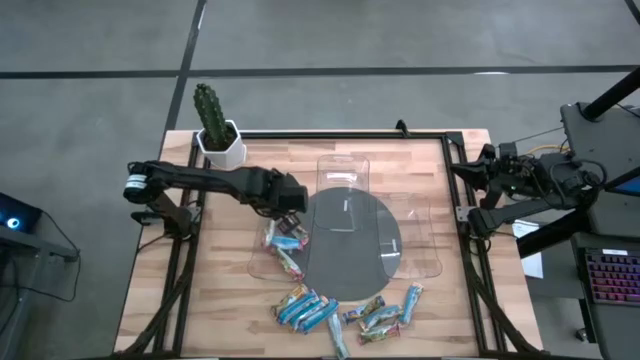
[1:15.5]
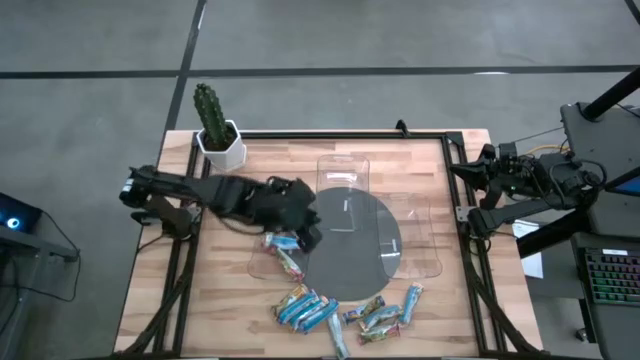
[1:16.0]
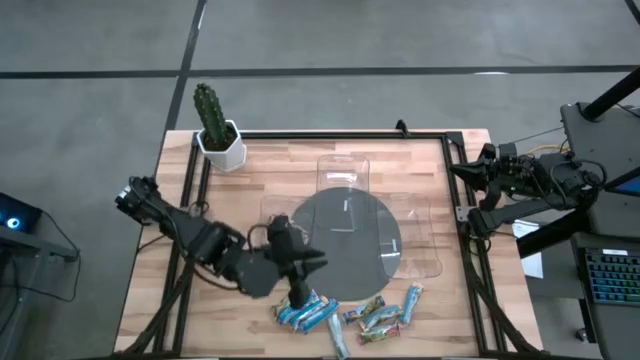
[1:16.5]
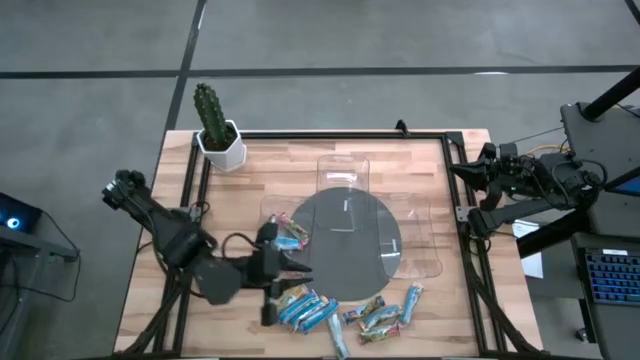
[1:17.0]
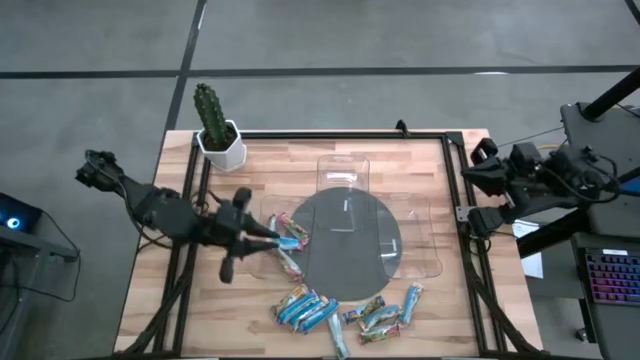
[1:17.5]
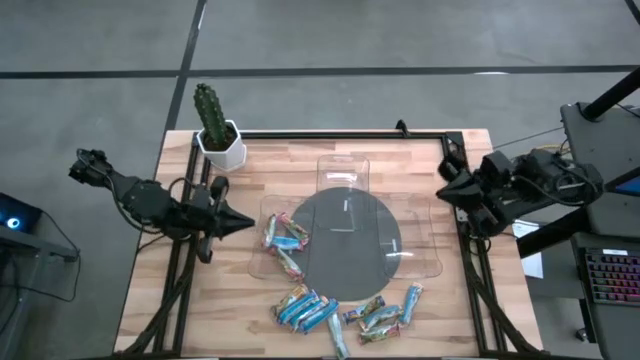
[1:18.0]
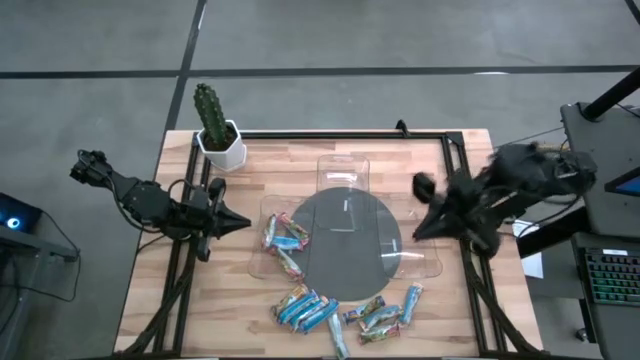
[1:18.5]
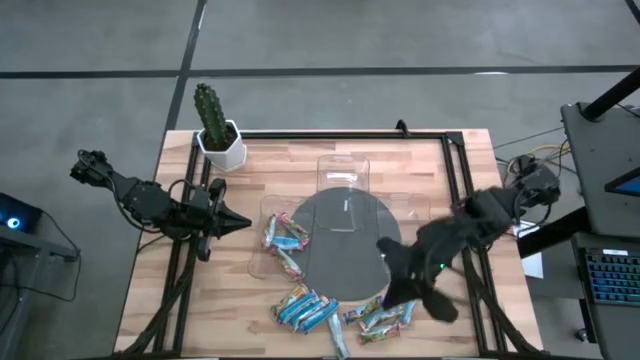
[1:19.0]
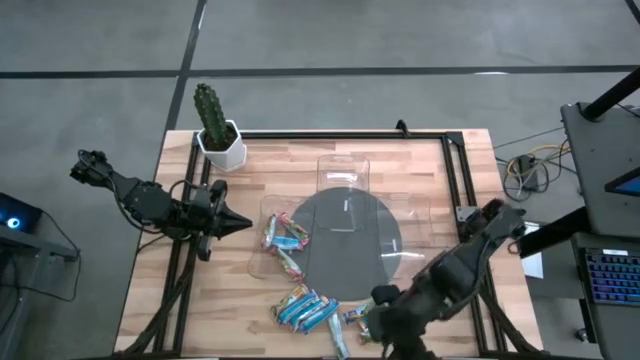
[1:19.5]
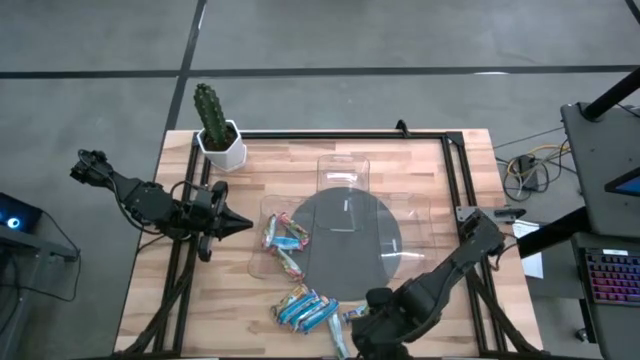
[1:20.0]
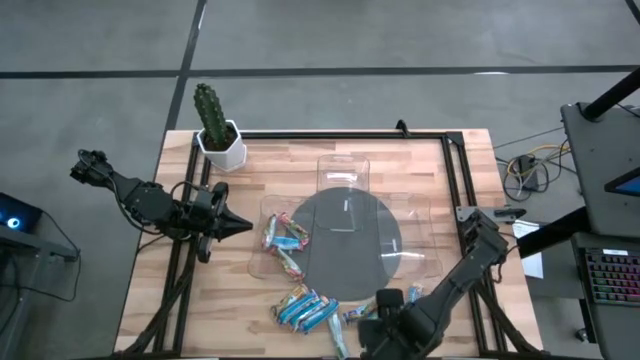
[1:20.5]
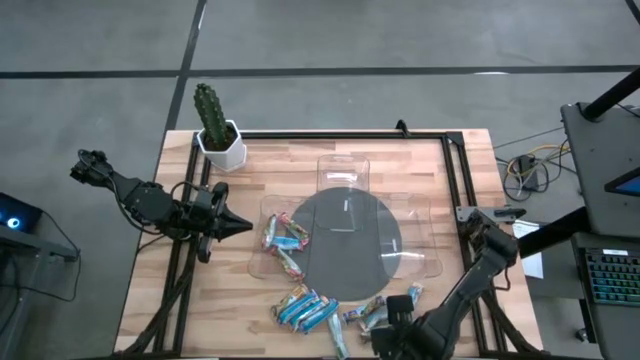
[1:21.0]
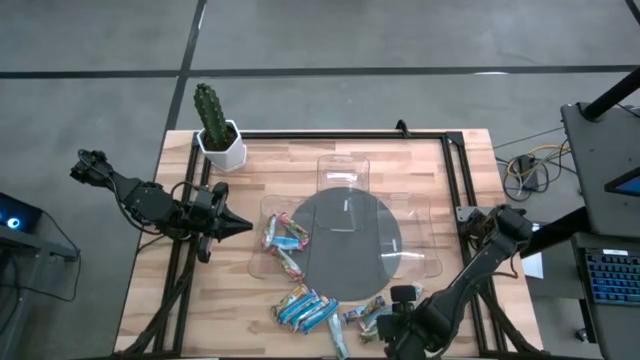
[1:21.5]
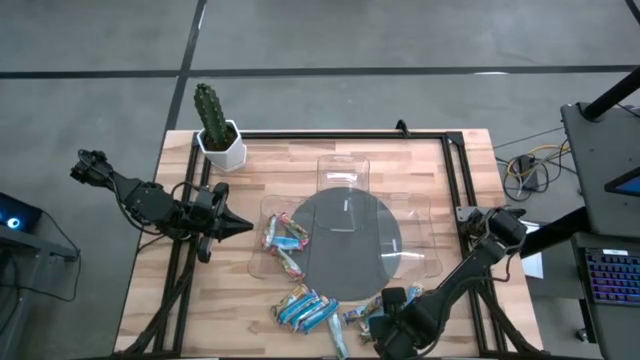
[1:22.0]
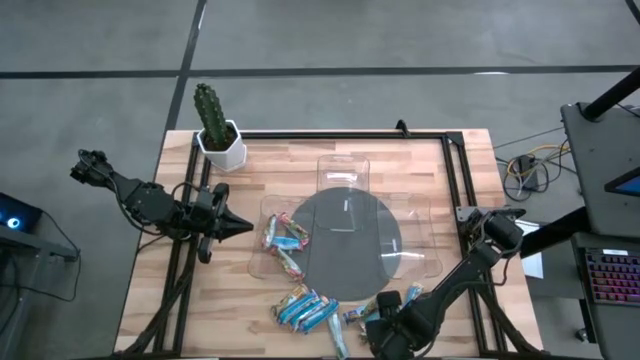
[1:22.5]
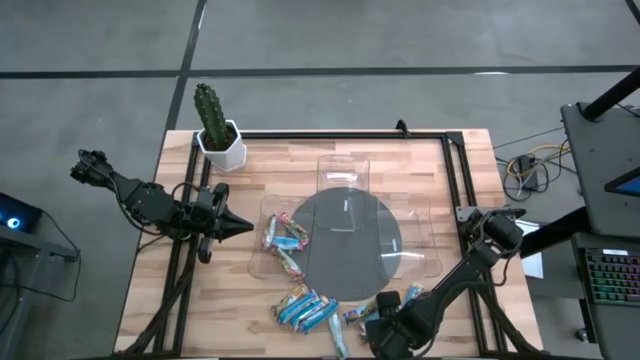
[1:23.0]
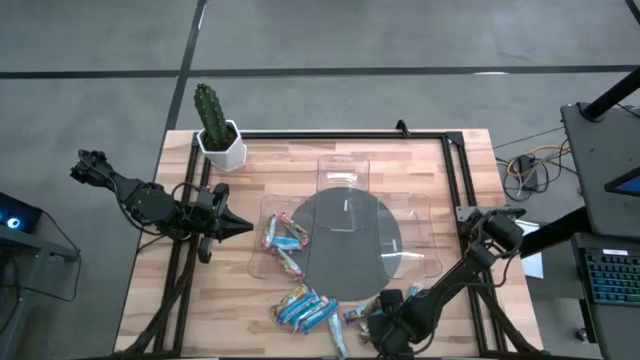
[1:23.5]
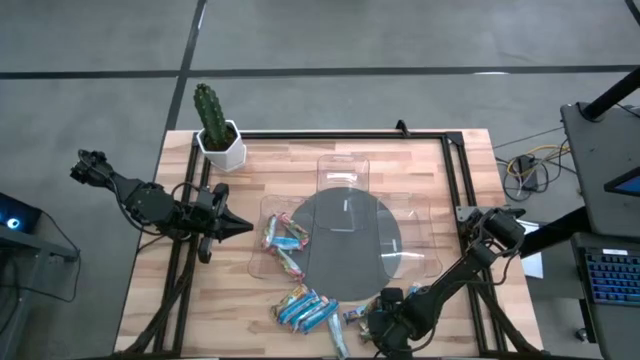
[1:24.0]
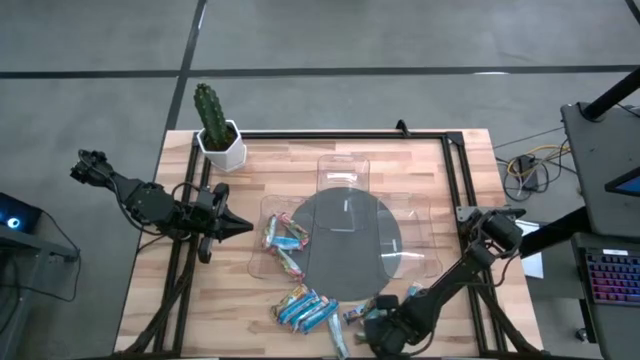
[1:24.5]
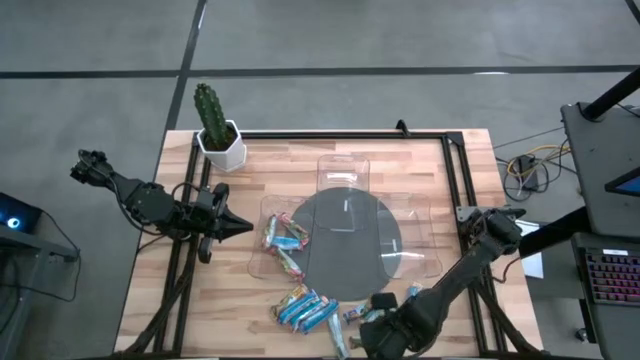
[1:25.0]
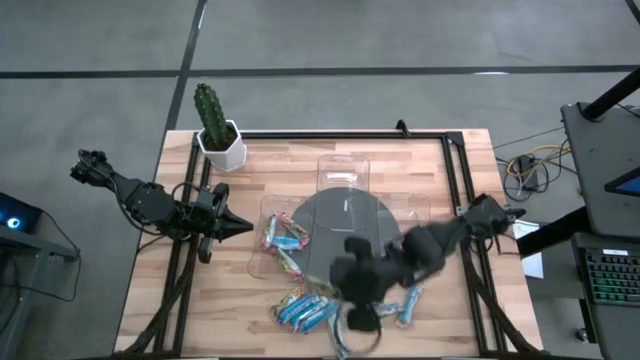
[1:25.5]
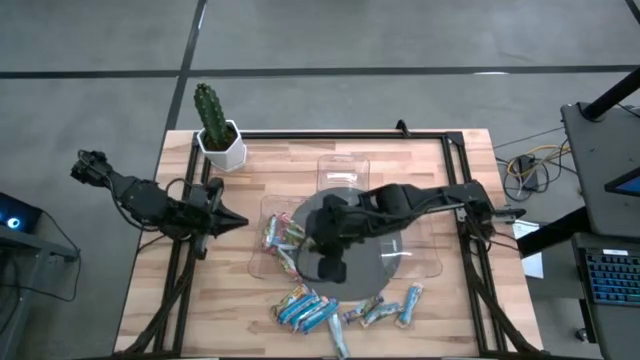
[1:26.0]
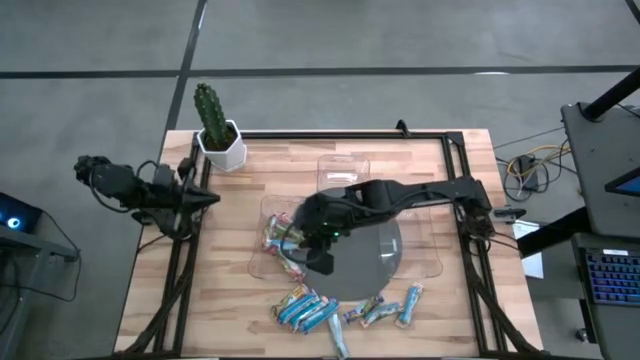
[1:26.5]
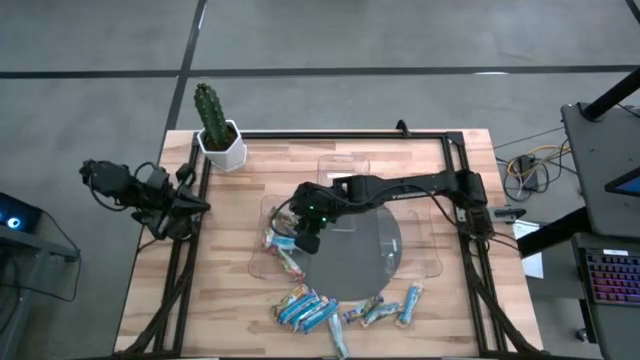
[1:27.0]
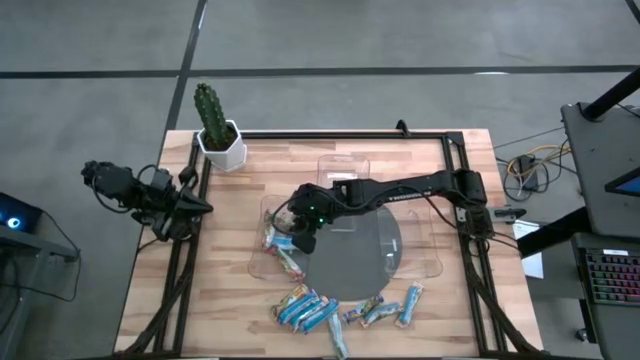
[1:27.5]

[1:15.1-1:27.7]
Task: Pick and place Granola Bars by type
Put the red granola bar into the left transparent bin

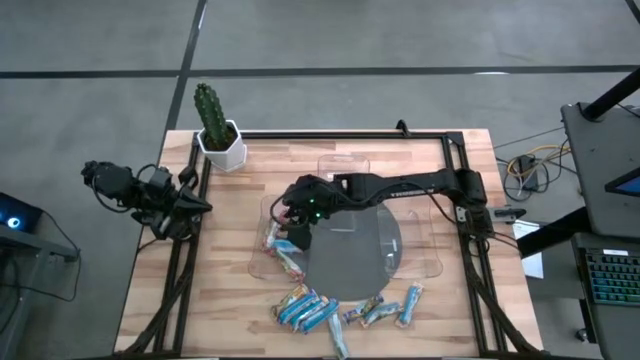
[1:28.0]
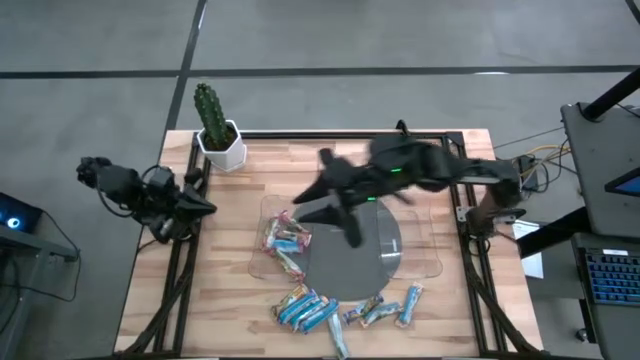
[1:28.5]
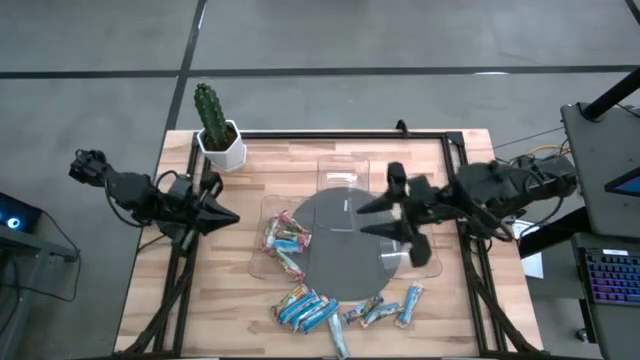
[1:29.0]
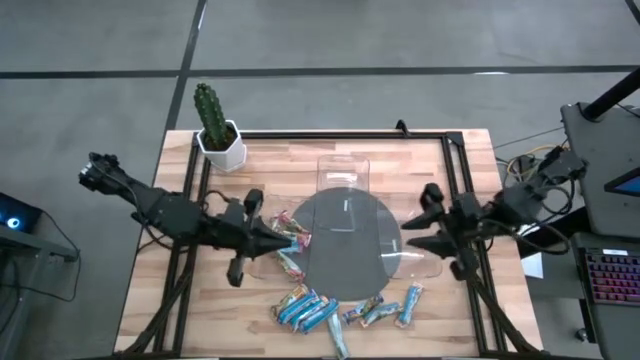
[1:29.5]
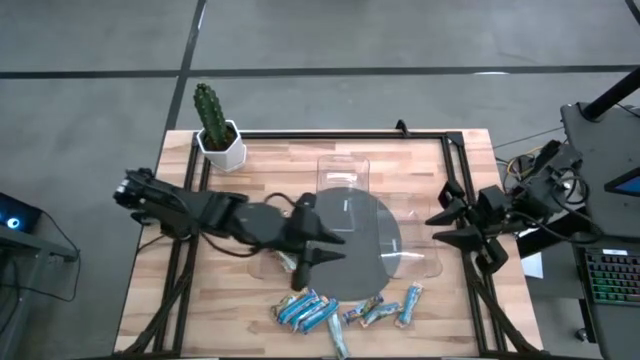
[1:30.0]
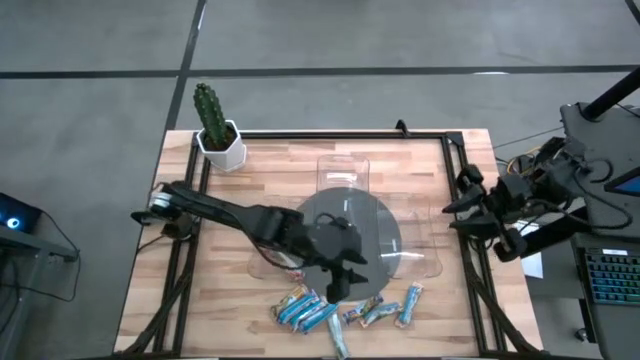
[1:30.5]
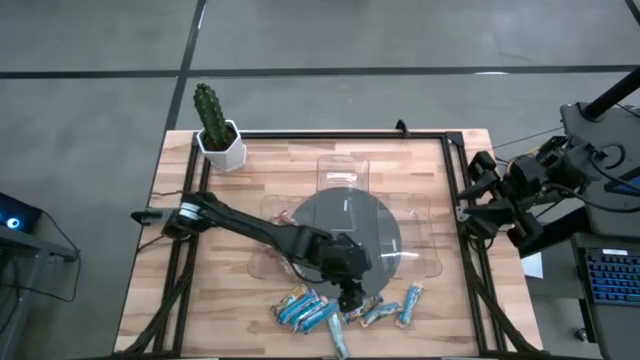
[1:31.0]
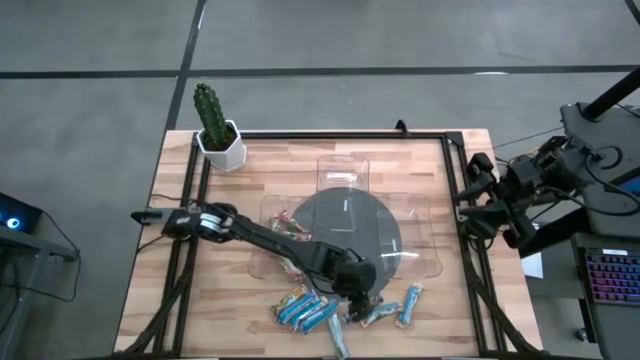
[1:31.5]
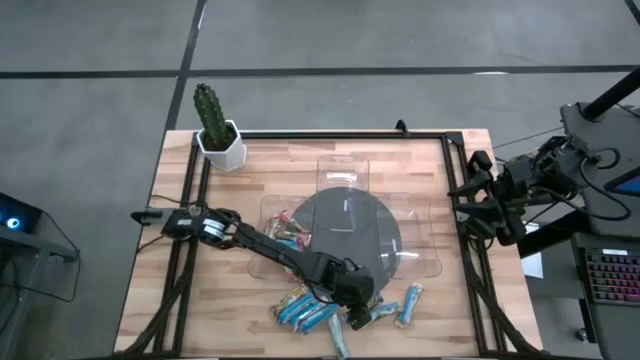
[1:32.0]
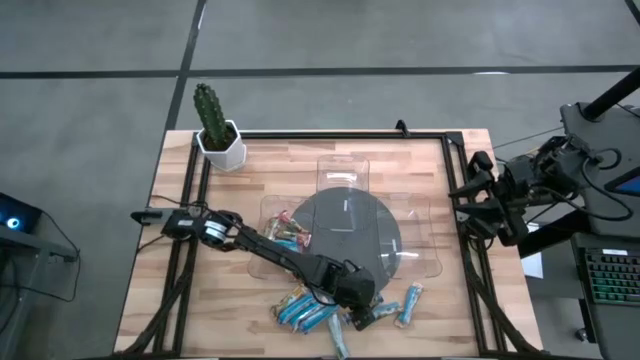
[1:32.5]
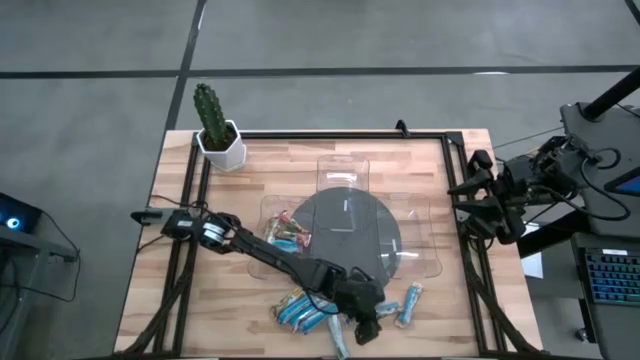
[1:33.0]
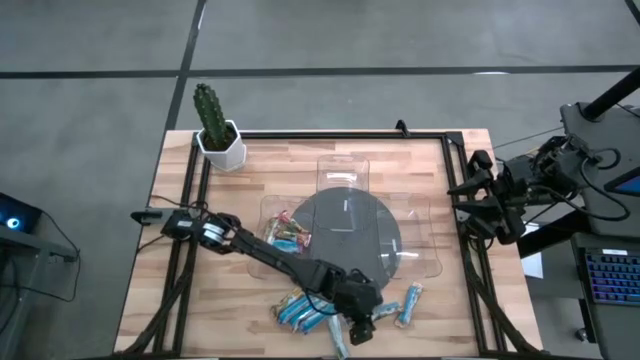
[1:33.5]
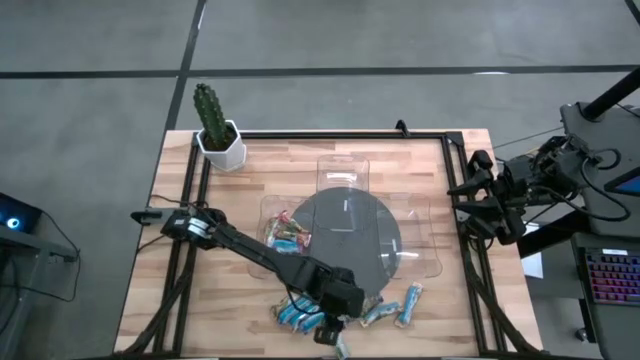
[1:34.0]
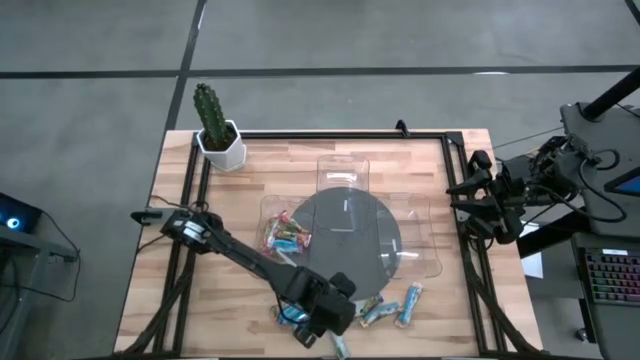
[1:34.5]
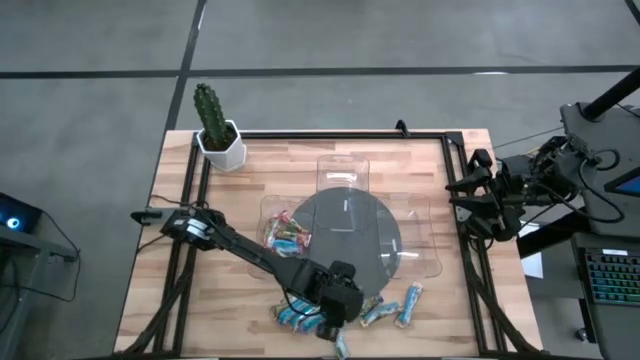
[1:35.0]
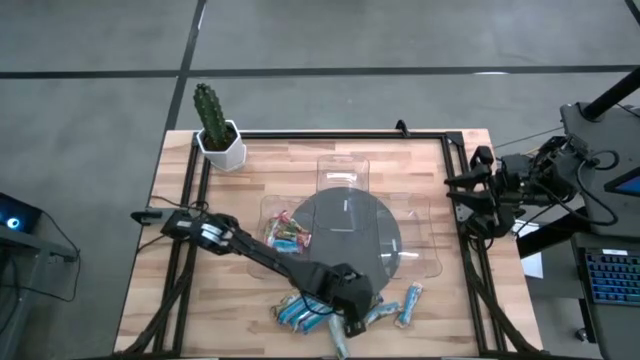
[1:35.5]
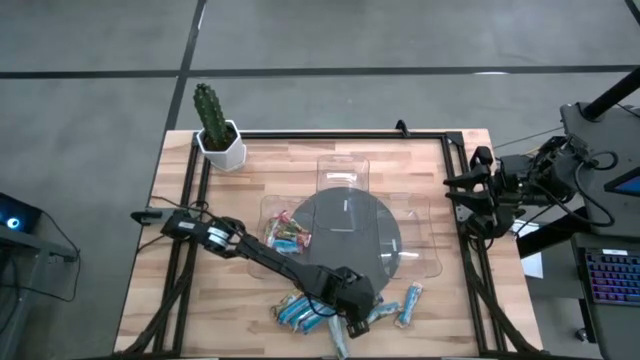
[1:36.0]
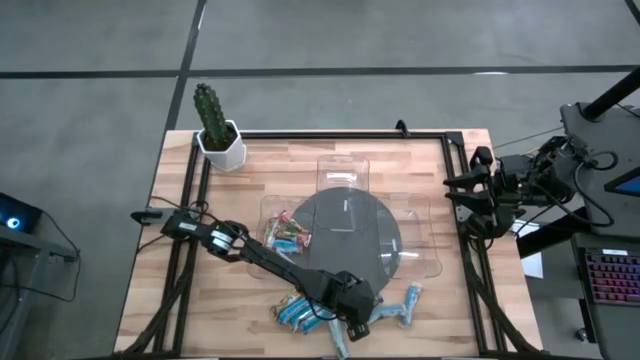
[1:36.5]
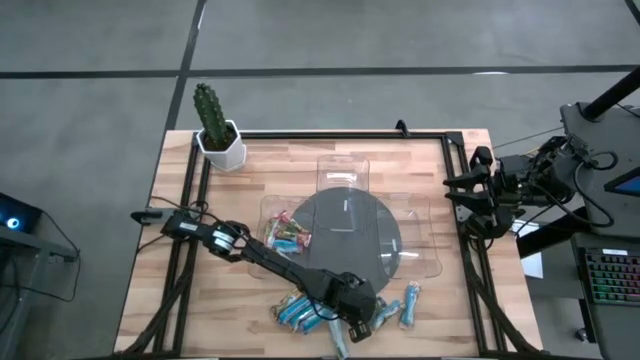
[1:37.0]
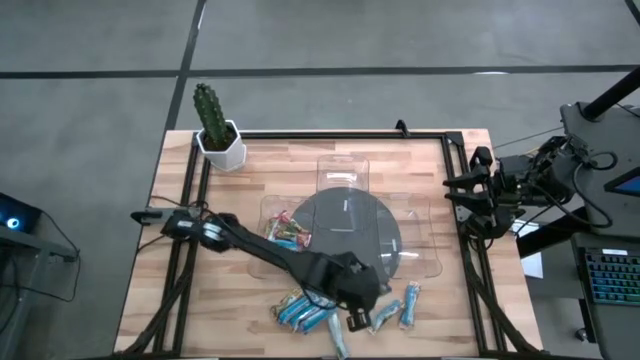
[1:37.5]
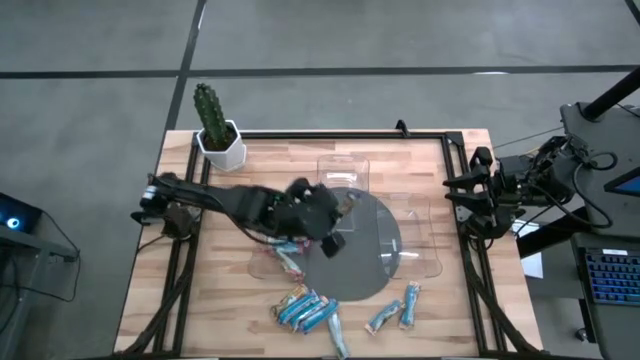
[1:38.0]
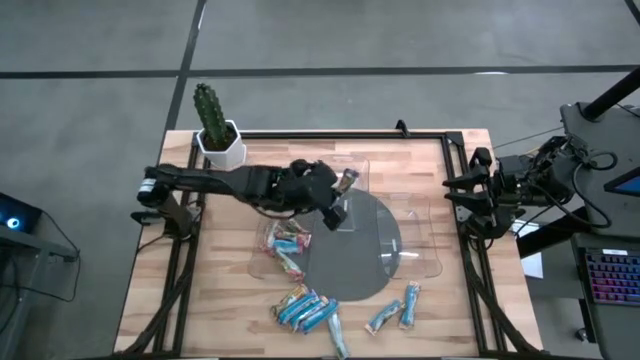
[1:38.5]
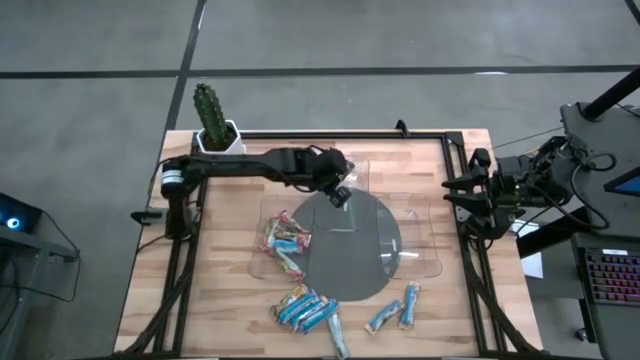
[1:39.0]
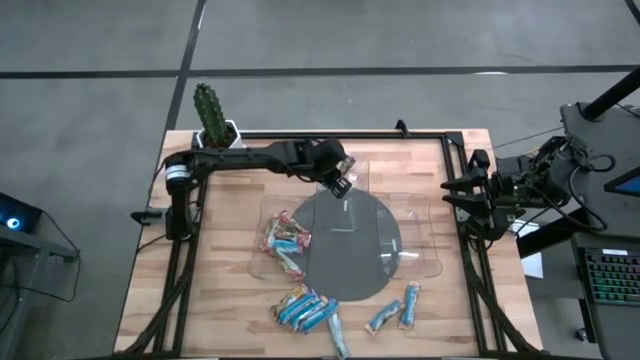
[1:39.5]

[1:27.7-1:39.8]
Put the blue granola bar into the top transparent bin
